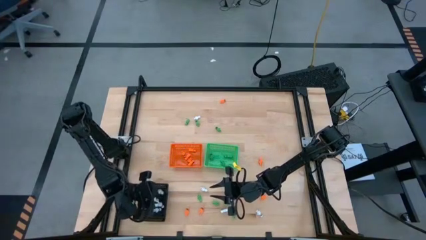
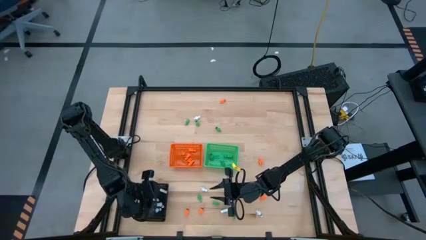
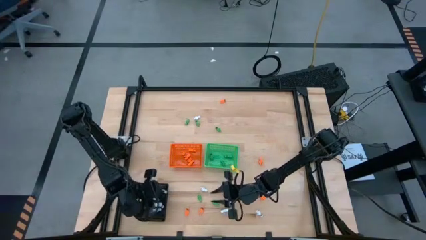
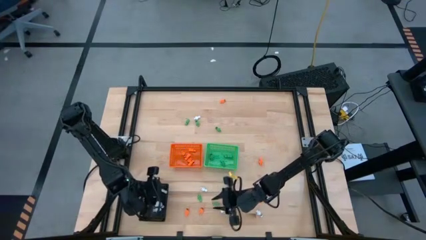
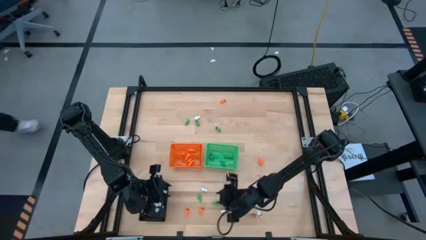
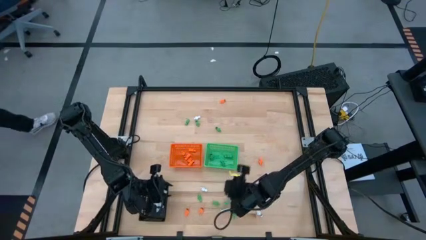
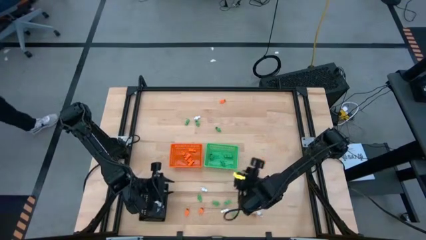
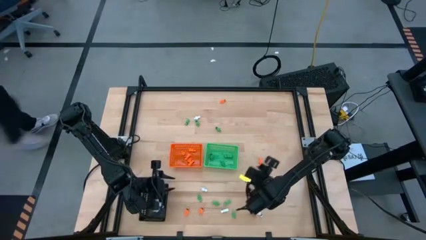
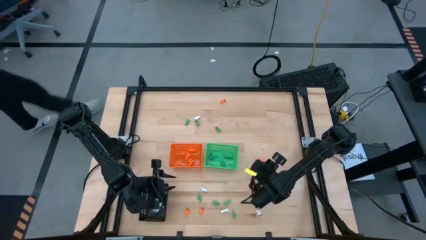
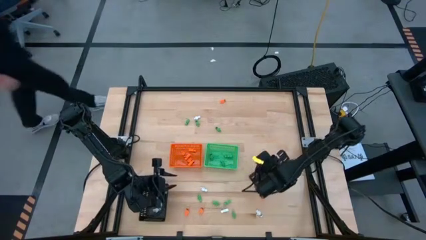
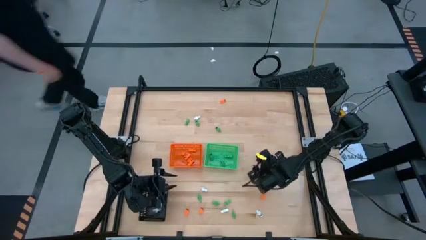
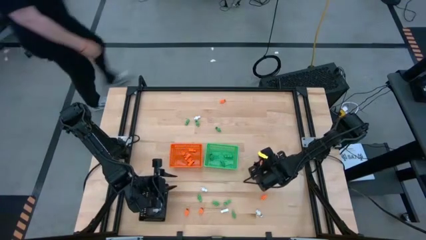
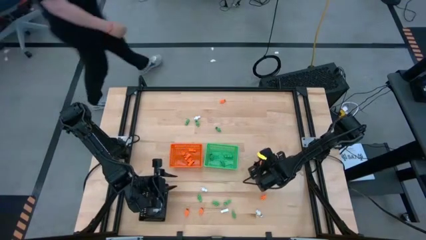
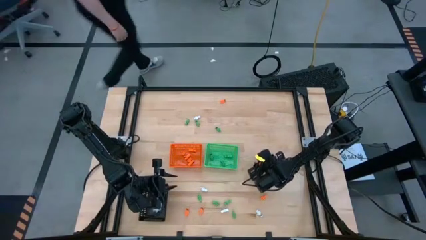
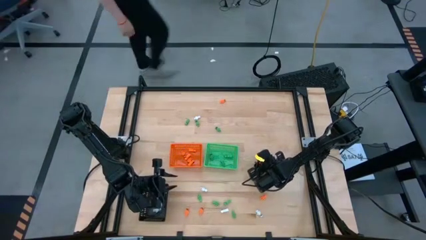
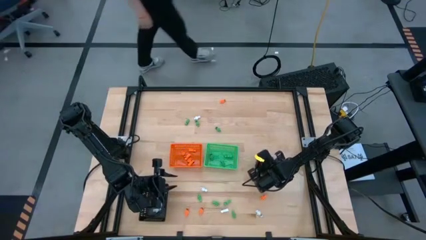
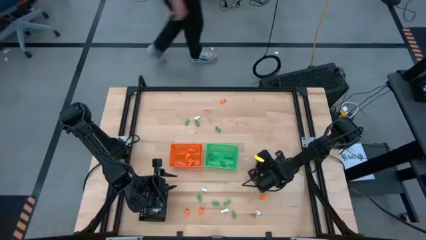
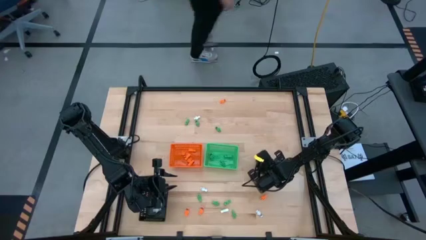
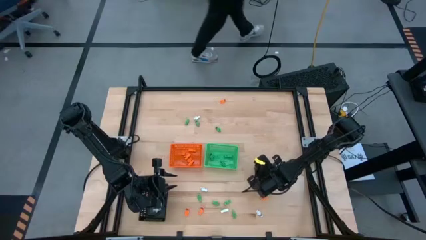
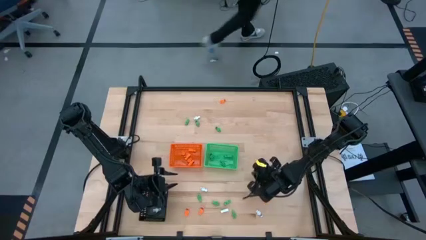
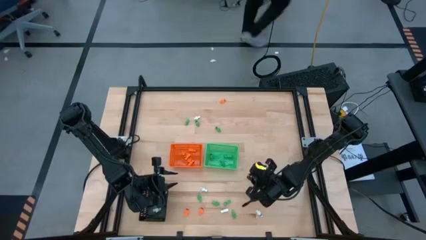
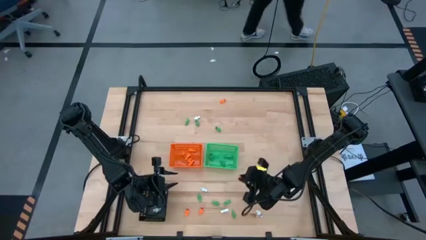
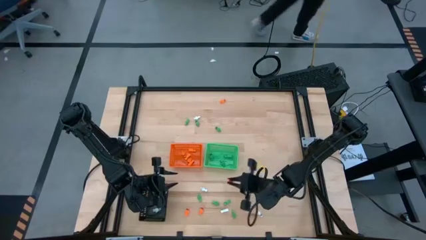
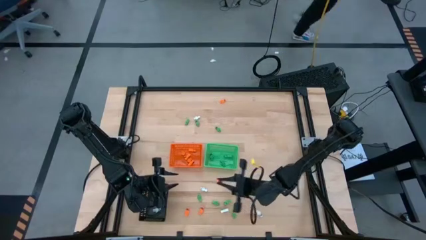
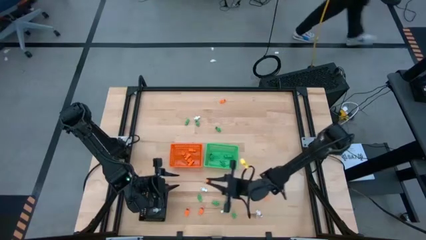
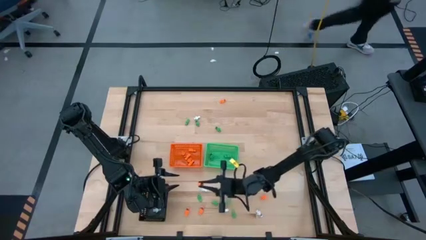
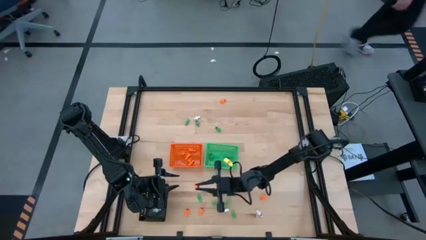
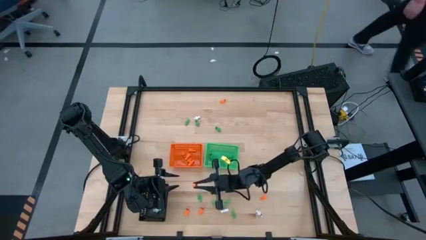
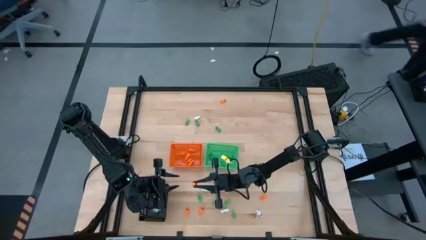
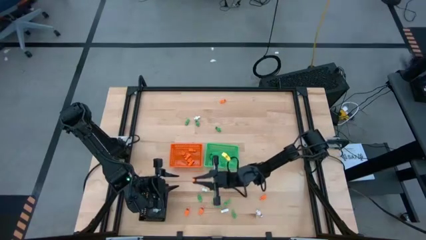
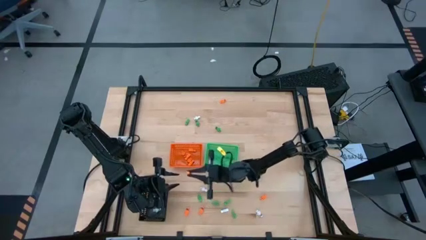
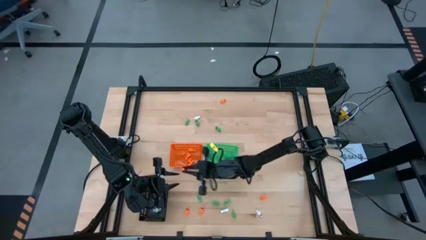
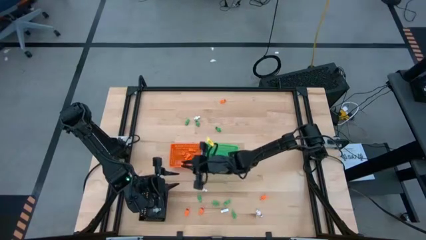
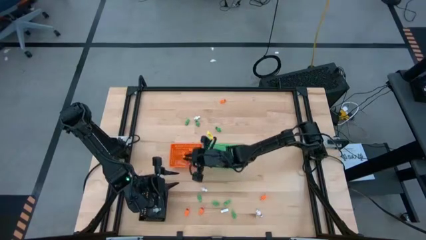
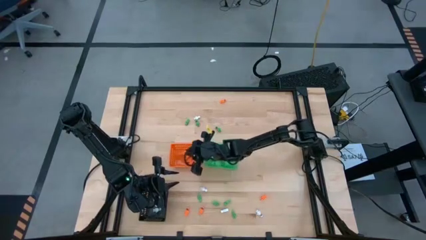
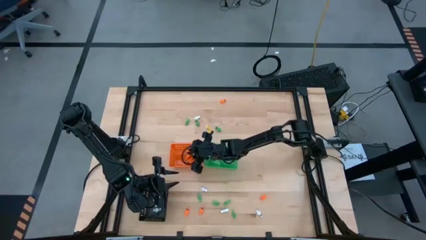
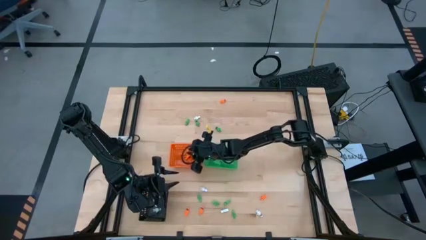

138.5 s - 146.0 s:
Task: Sort Halloween decoration
Put the orange skeleton toy into the orange bin

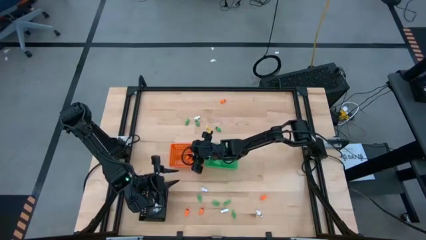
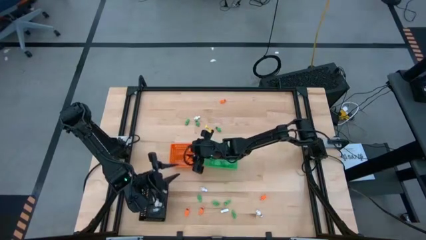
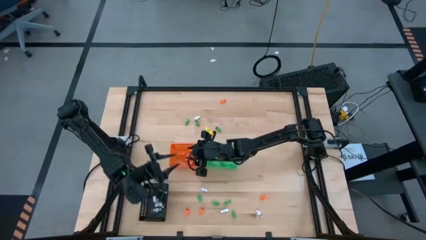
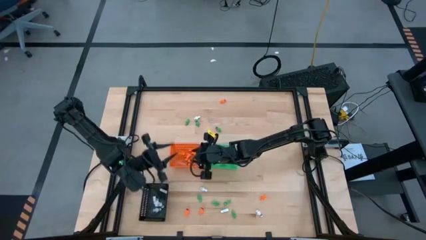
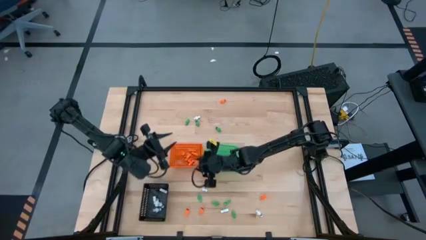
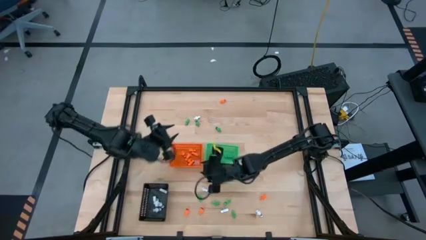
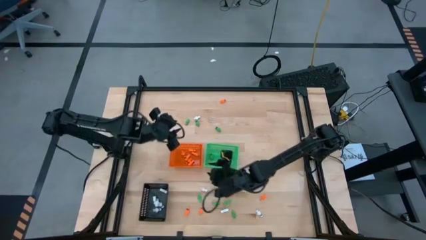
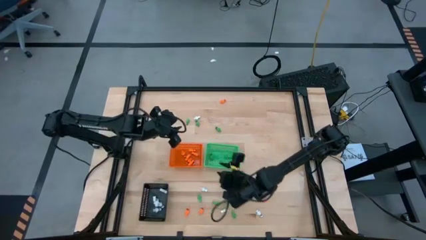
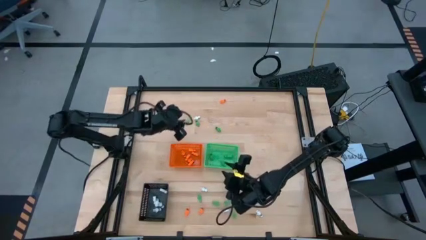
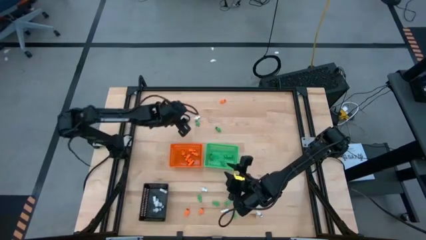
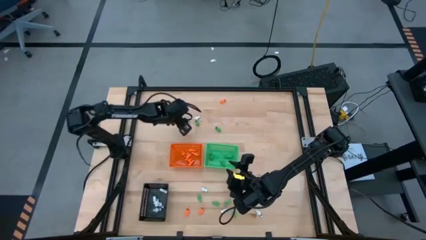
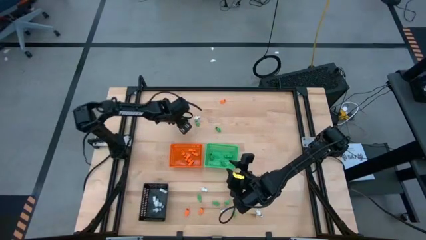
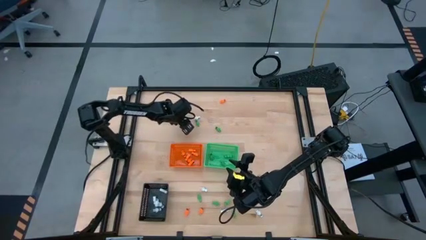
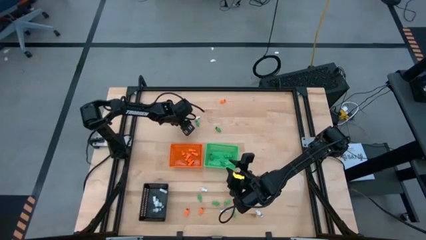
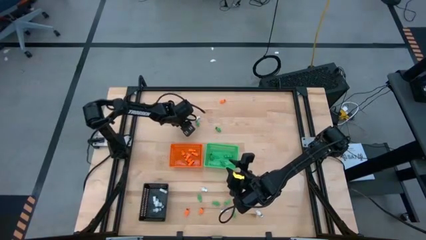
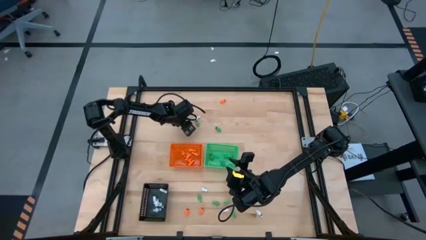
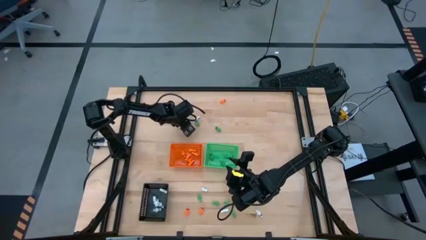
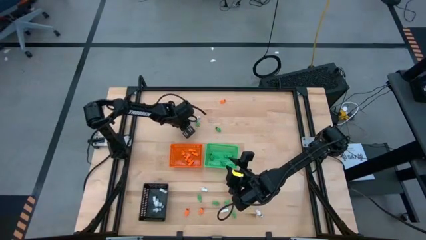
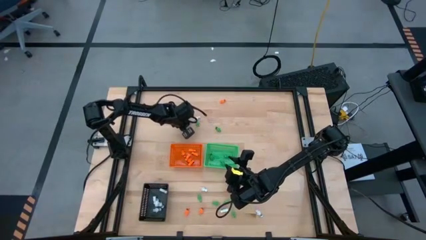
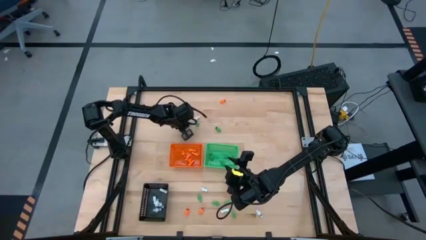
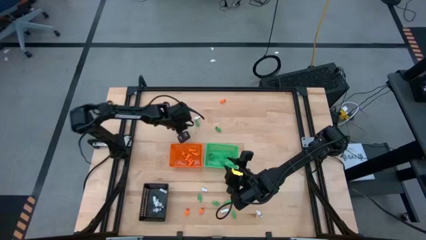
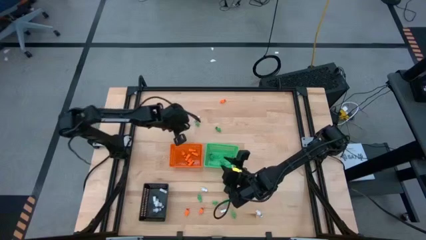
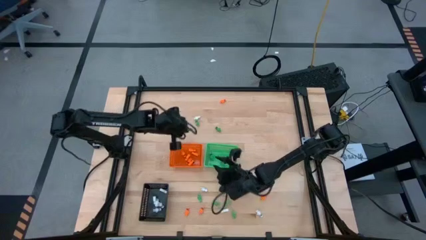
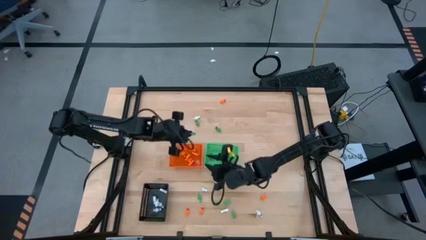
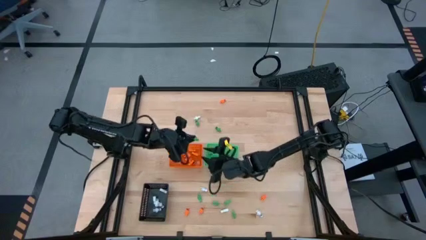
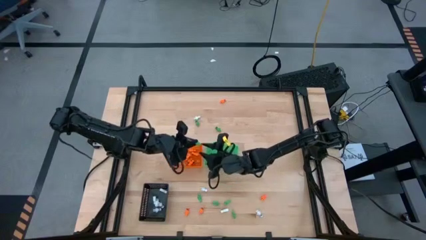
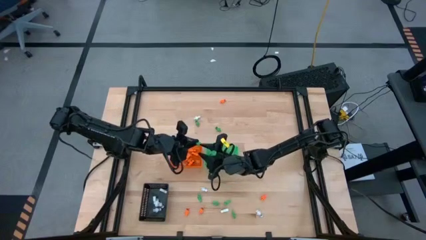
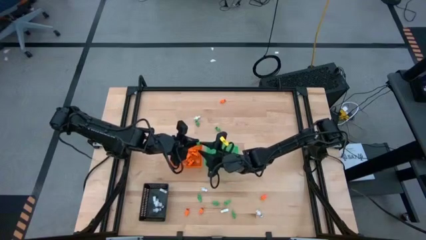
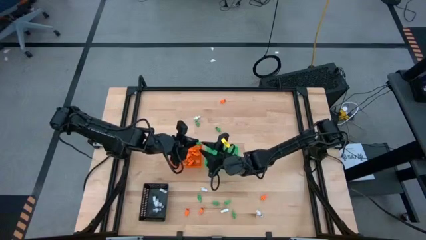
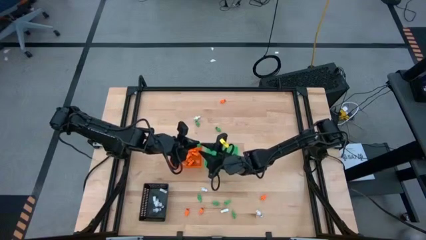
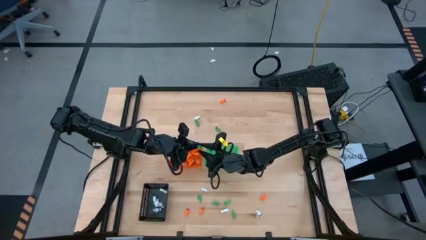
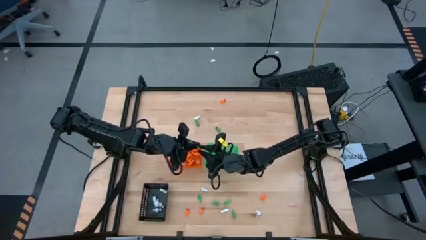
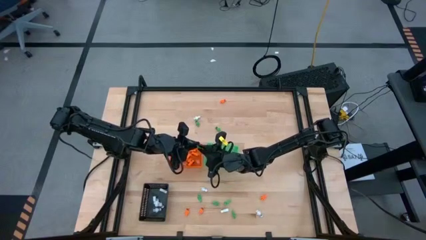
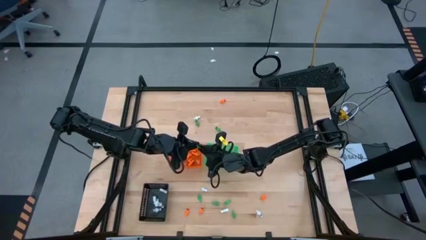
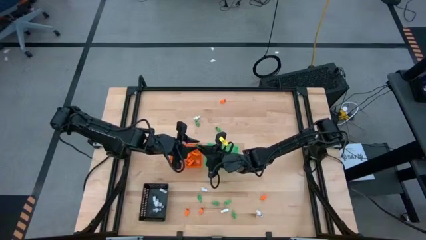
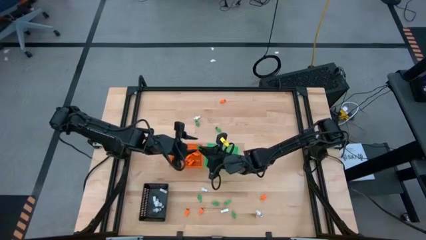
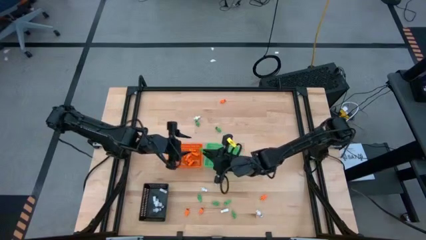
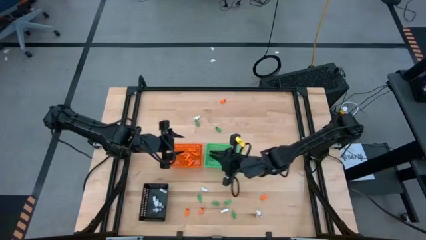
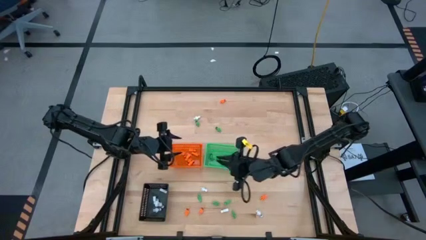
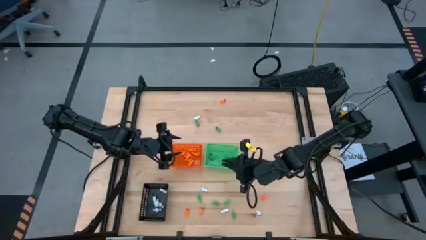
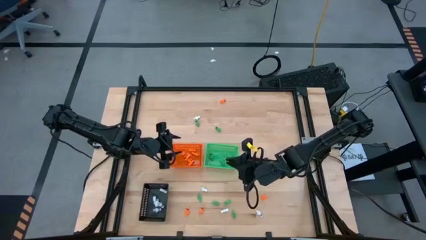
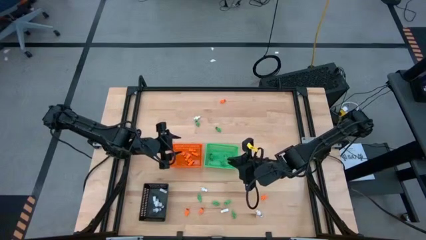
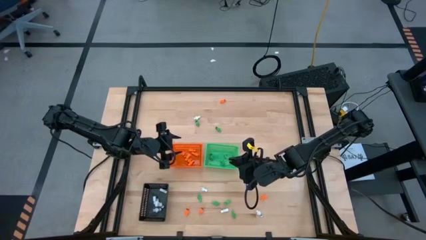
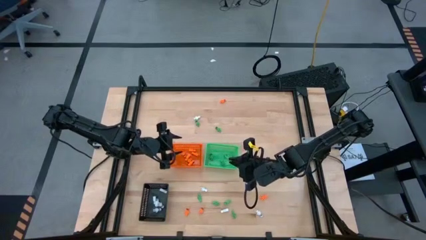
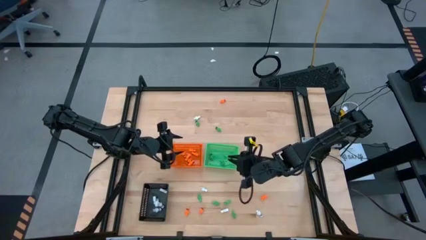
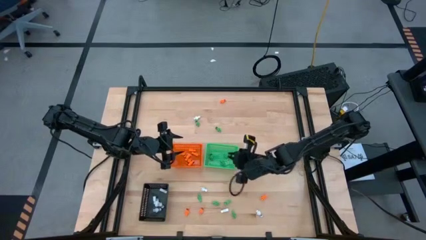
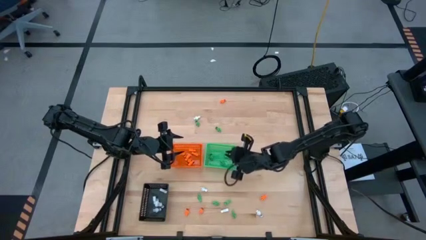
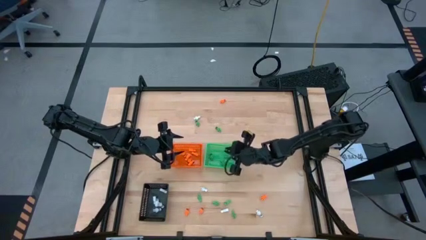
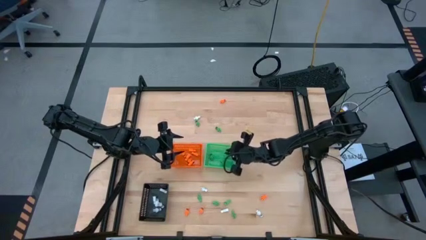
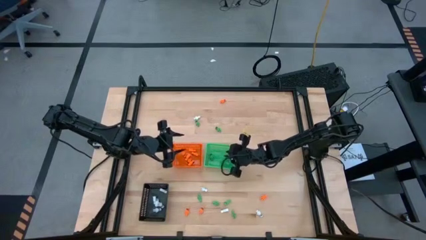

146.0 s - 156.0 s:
Put the green skeleton toy into the green bin
